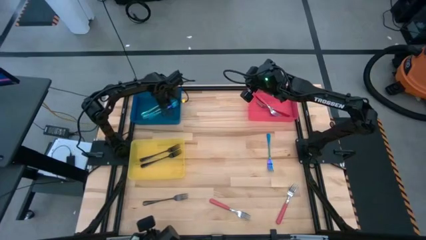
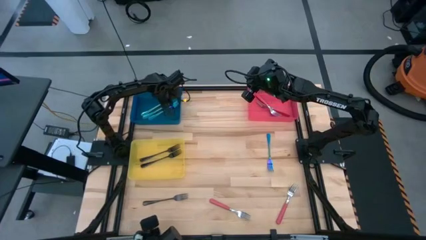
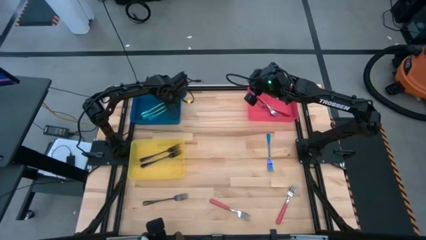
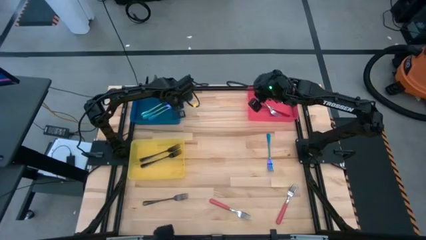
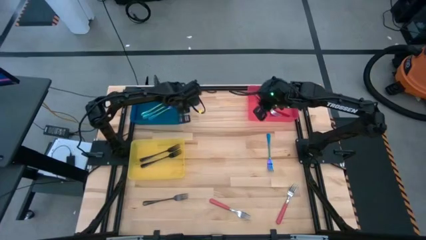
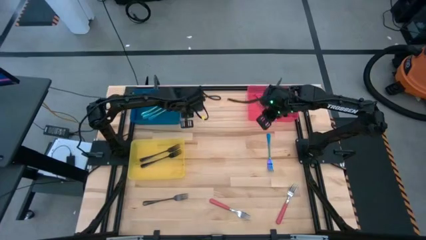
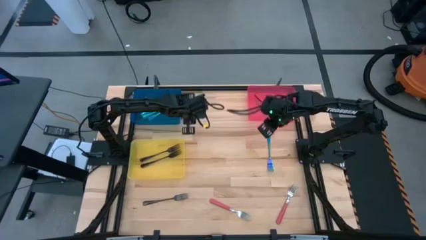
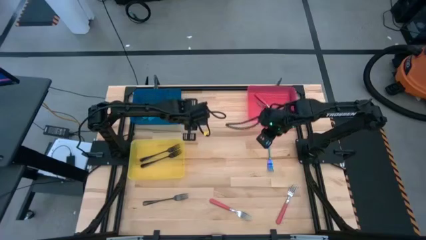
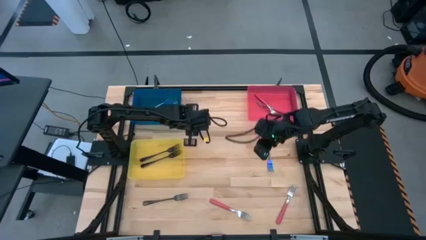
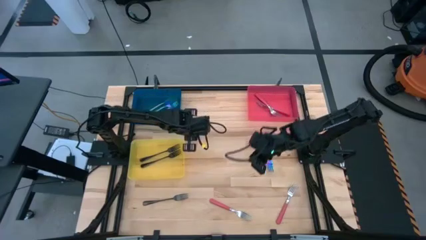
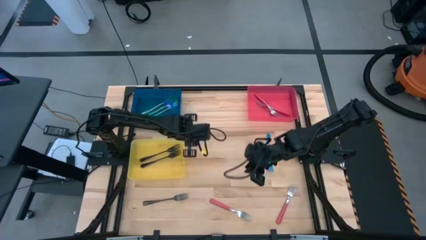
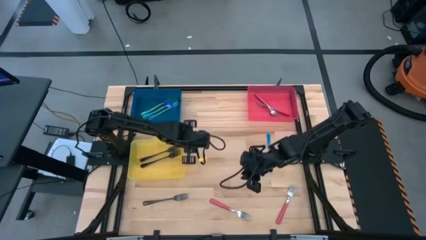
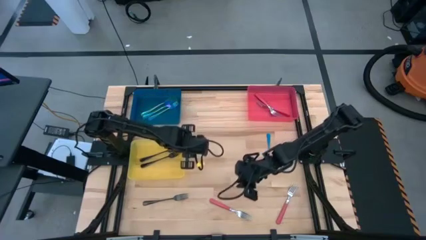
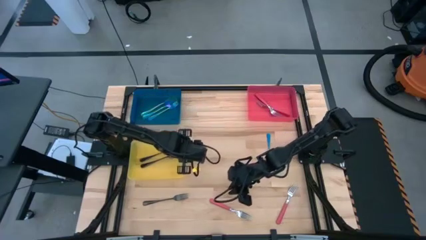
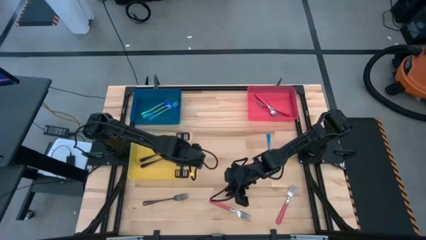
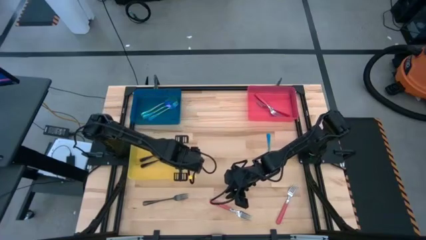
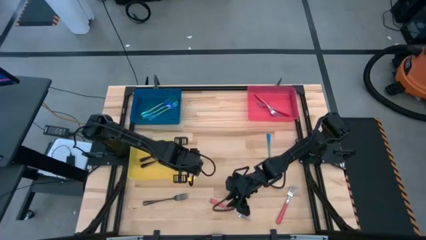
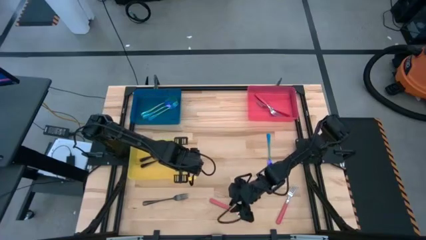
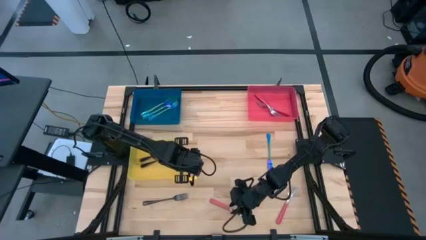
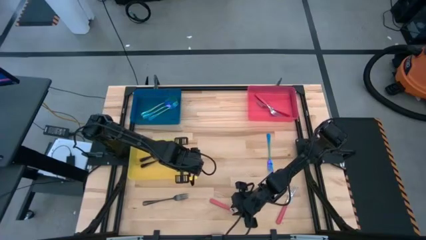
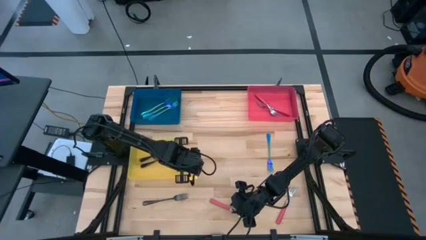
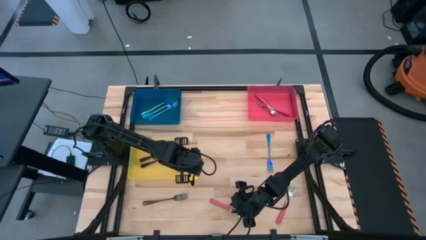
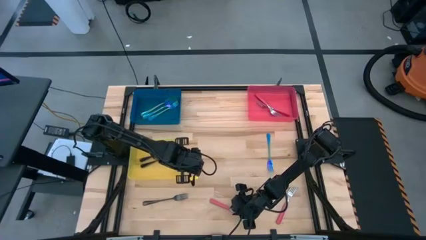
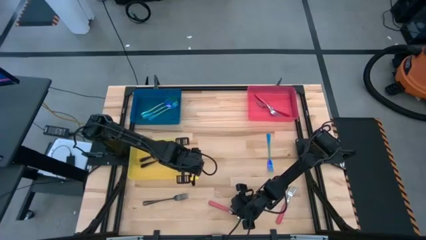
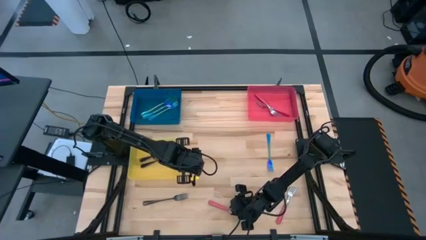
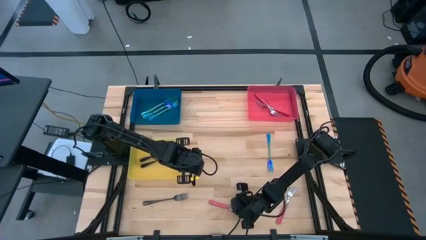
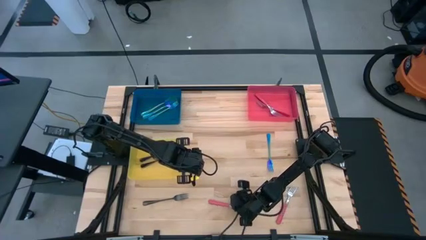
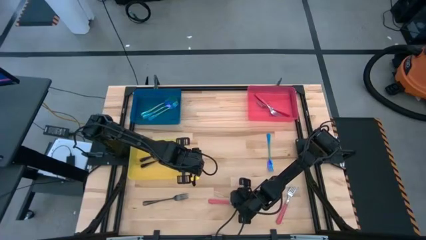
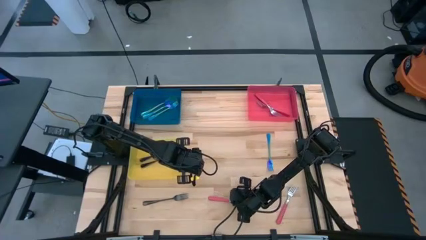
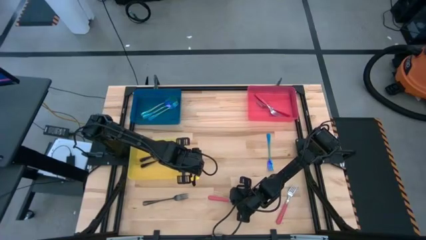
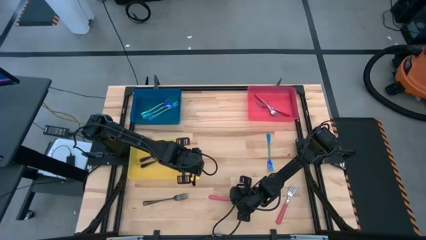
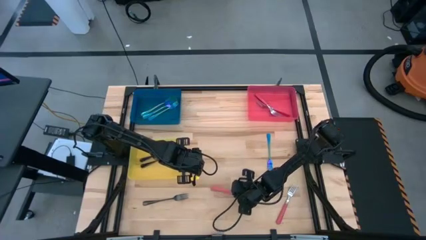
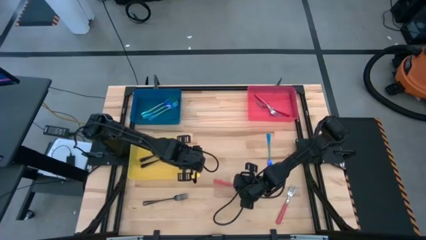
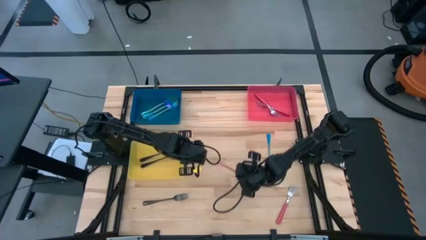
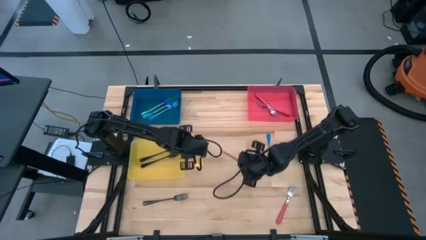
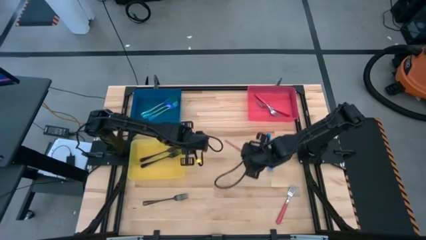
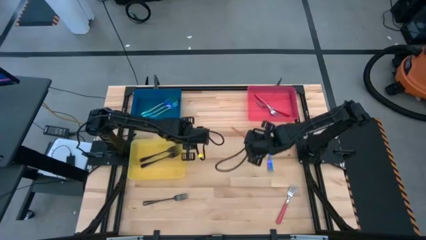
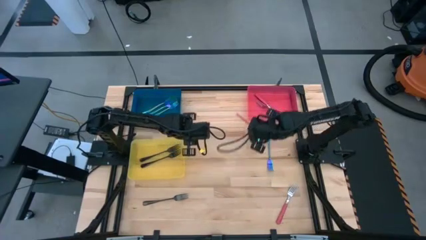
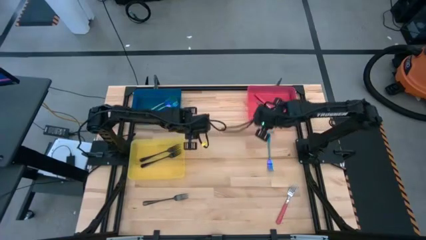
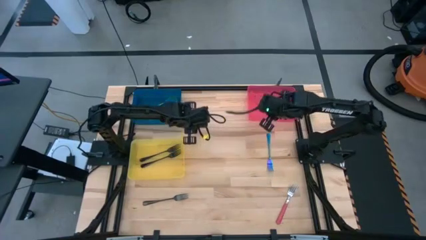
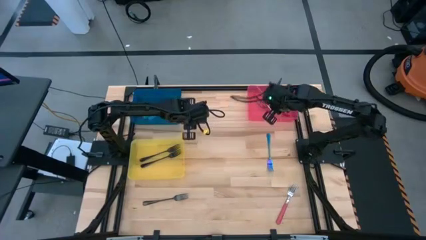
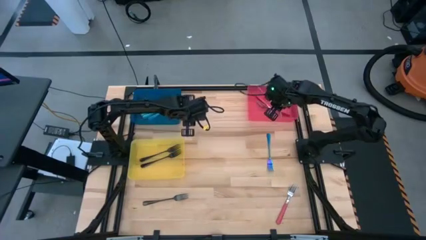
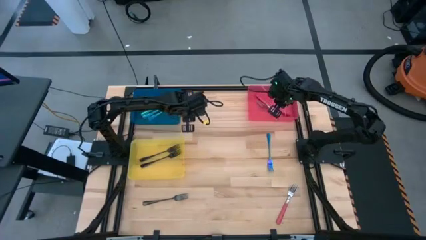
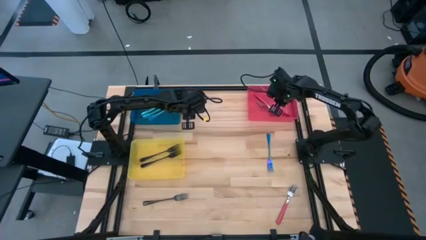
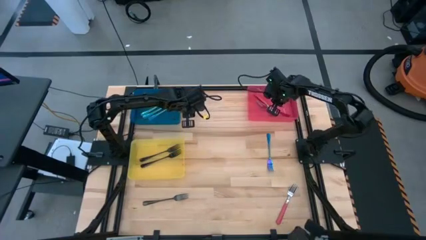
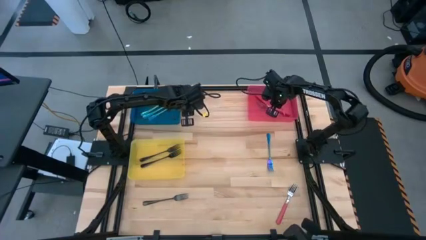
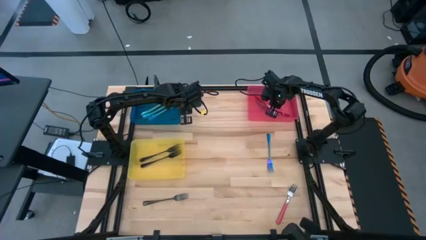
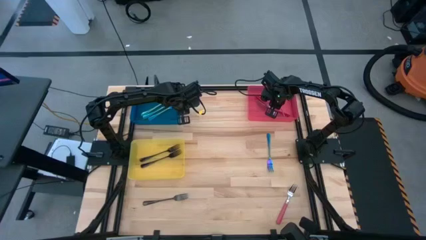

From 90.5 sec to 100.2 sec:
Task: Sort silverware by color (type)
Put the pink fork into the red bin

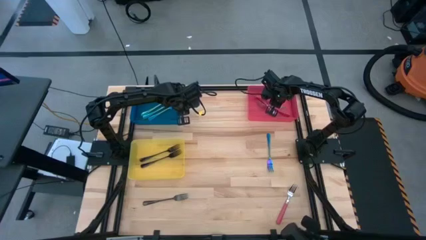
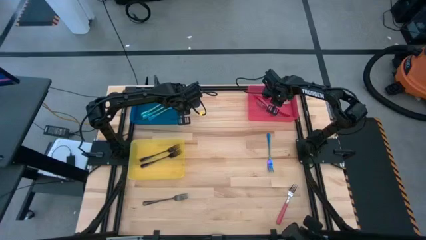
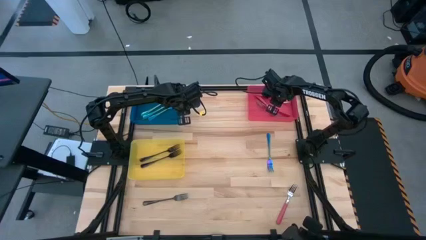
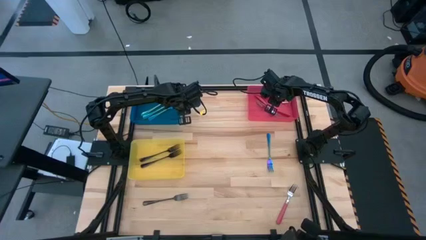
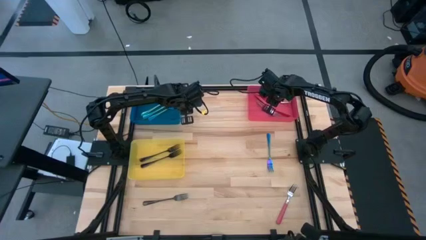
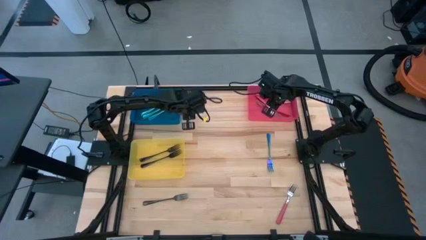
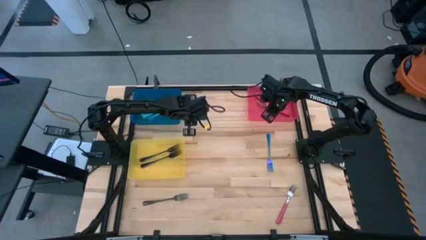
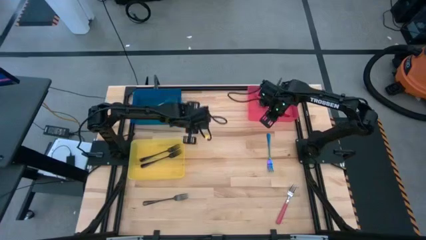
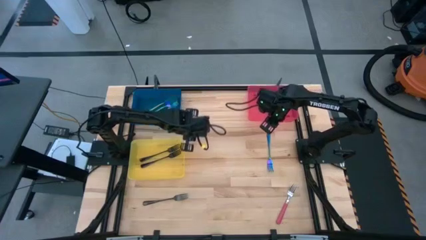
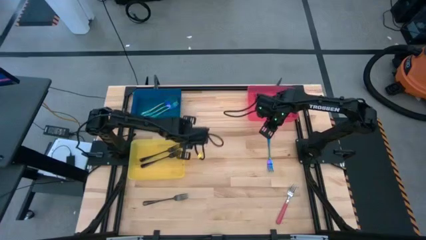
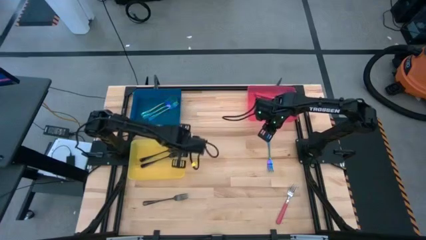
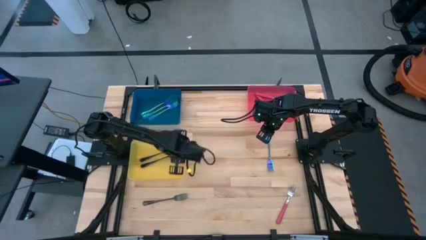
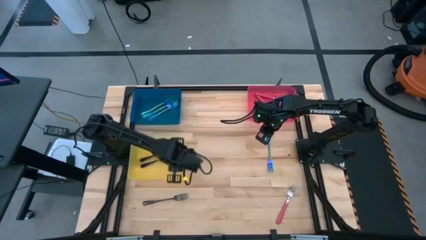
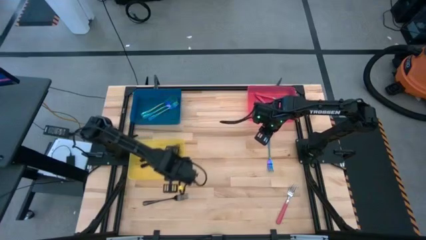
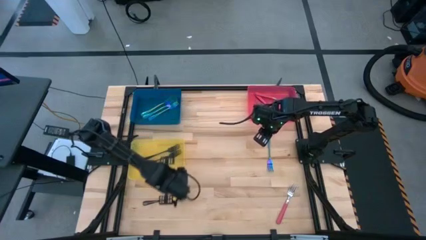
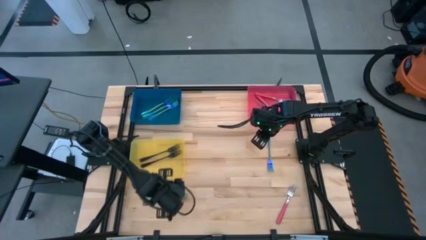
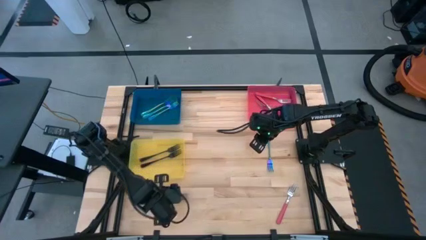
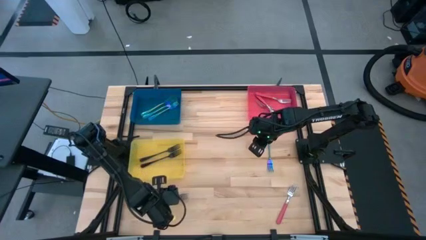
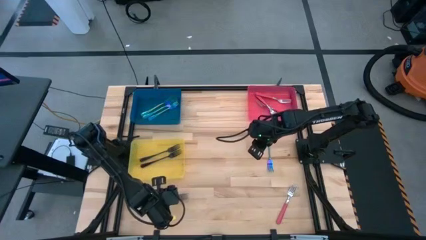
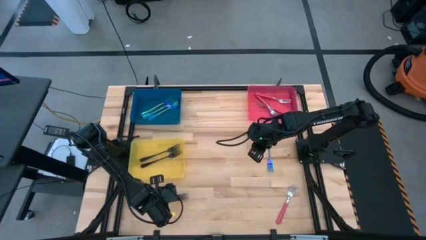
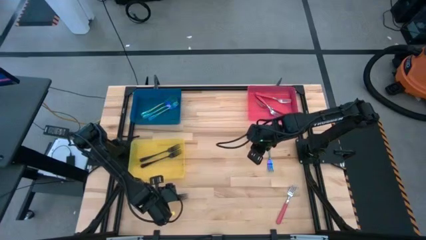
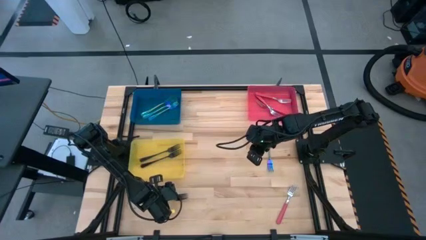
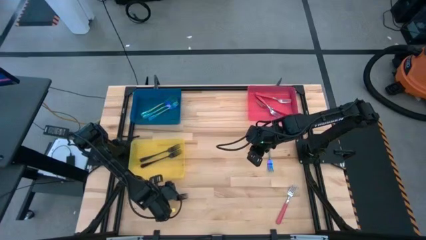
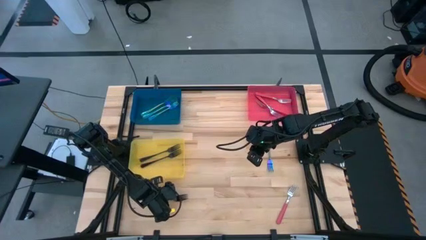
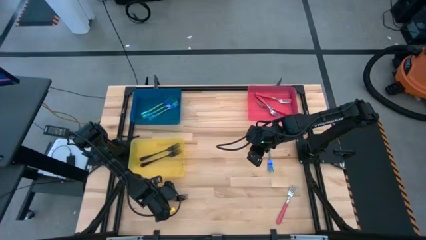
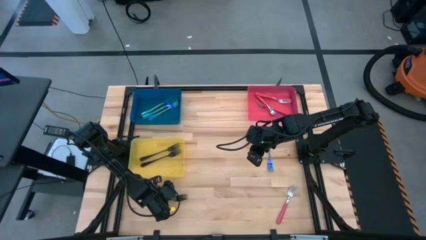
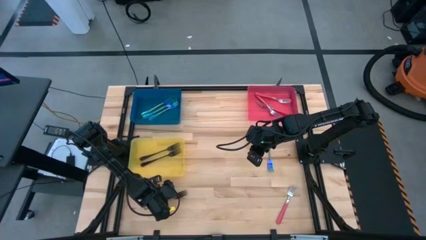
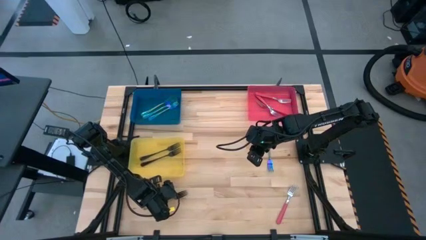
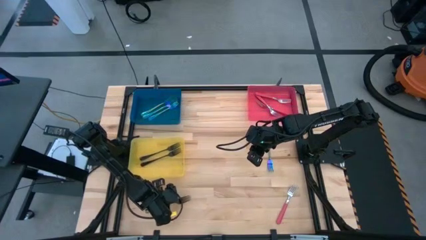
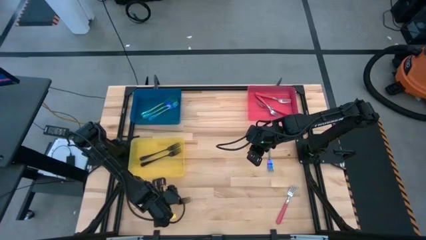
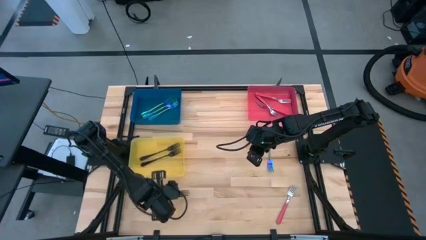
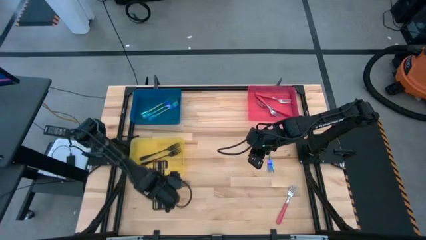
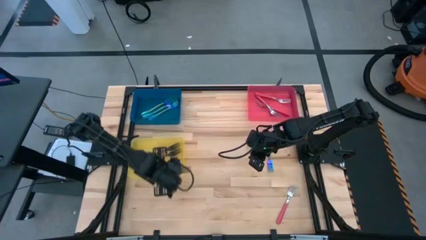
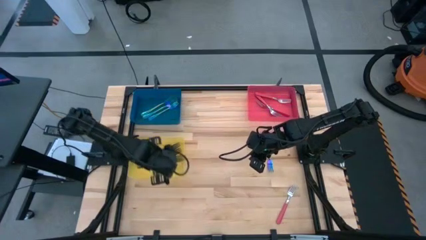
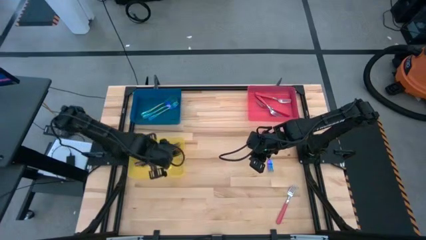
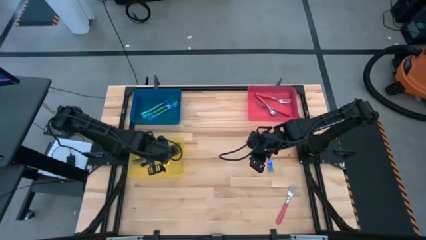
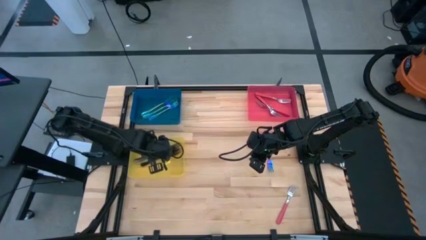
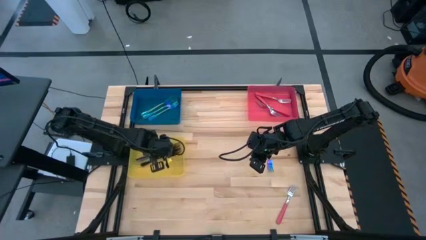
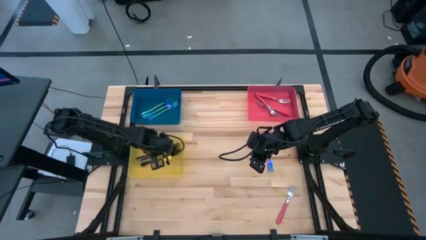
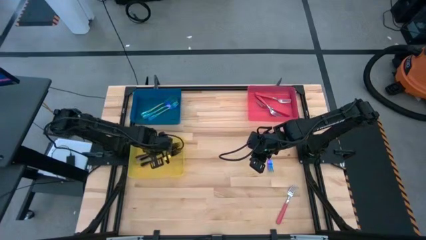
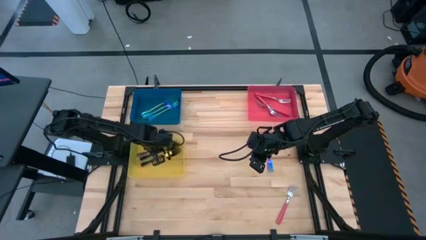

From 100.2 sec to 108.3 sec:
Put the black fork into the yellow bin
